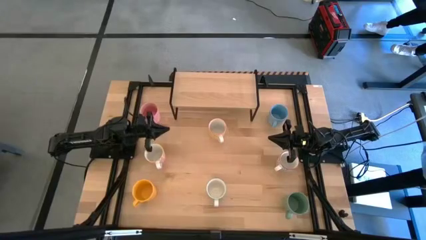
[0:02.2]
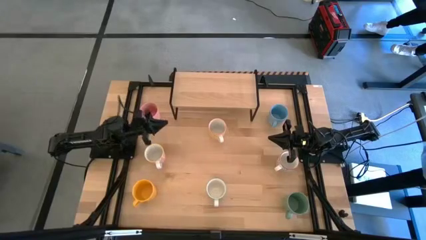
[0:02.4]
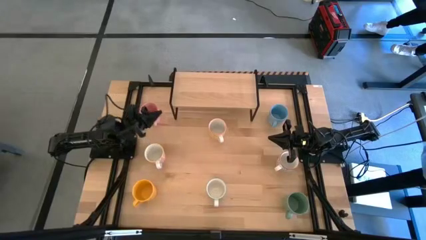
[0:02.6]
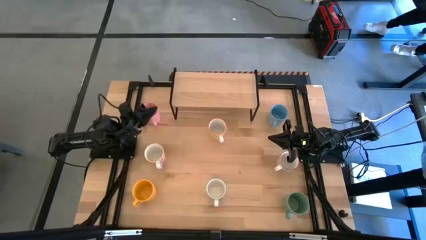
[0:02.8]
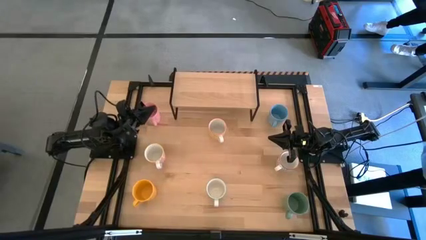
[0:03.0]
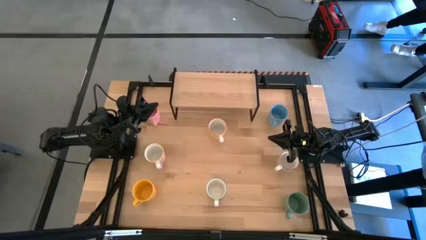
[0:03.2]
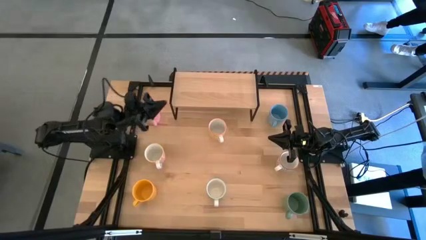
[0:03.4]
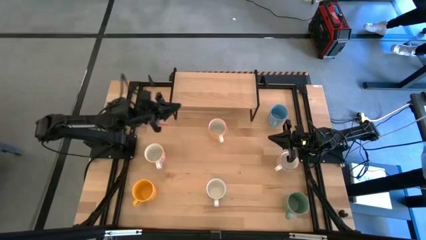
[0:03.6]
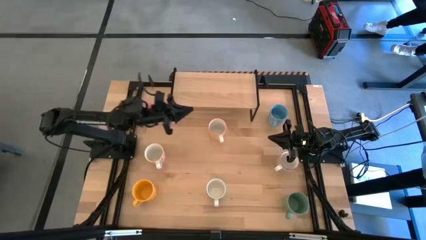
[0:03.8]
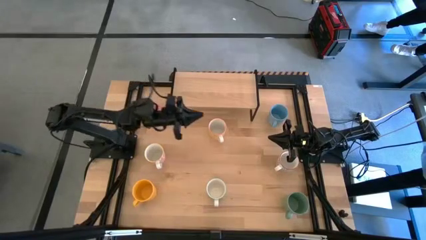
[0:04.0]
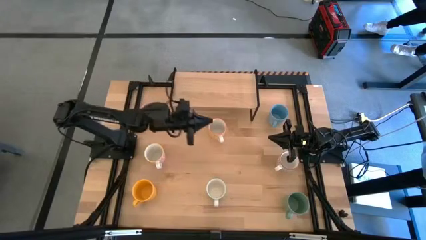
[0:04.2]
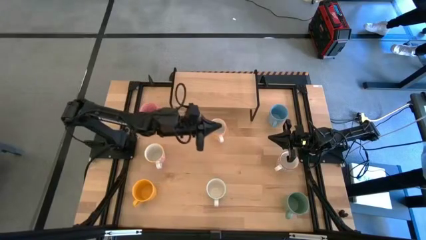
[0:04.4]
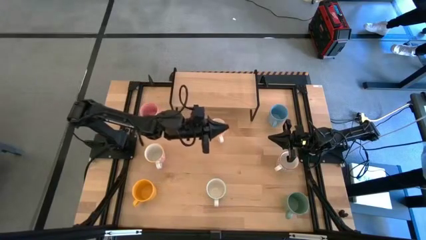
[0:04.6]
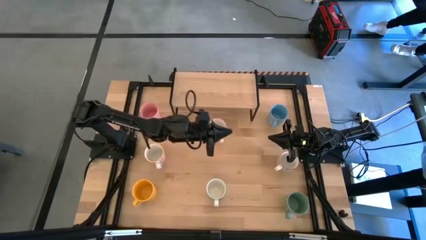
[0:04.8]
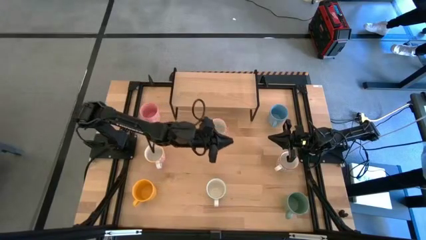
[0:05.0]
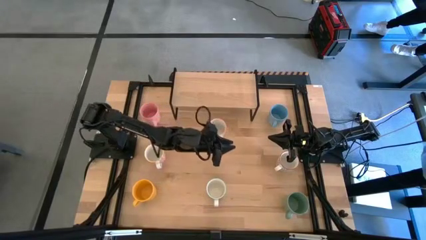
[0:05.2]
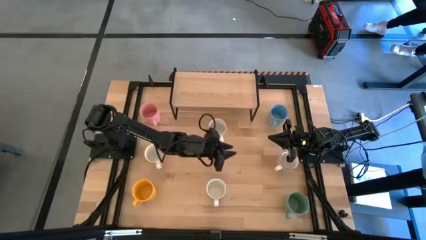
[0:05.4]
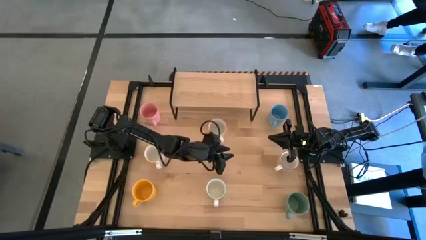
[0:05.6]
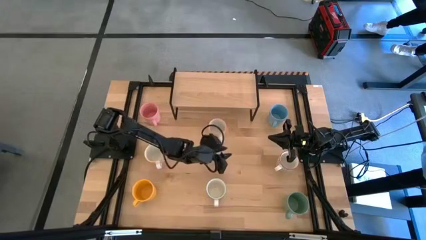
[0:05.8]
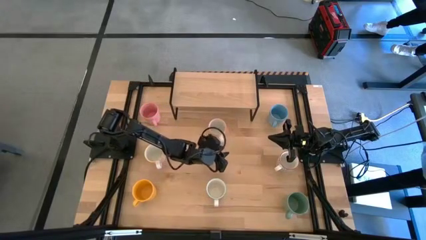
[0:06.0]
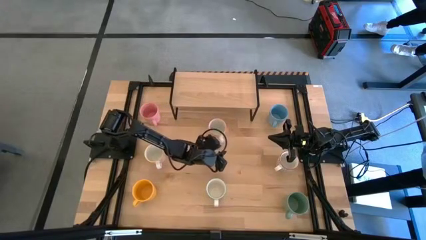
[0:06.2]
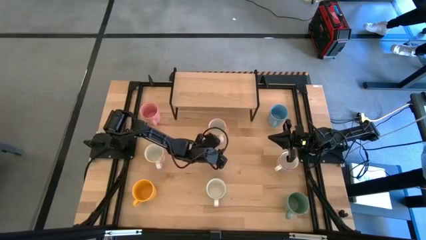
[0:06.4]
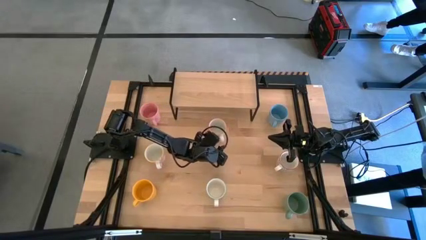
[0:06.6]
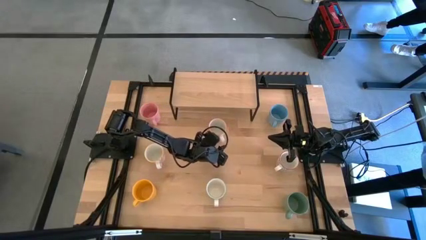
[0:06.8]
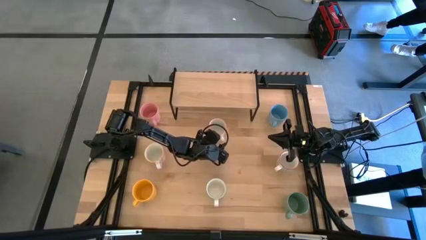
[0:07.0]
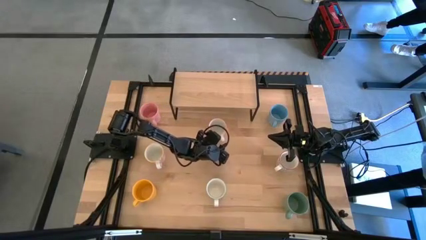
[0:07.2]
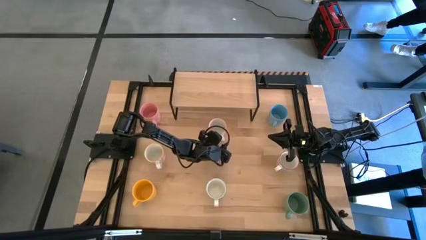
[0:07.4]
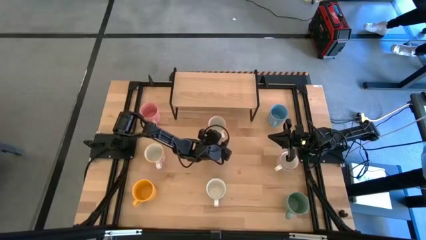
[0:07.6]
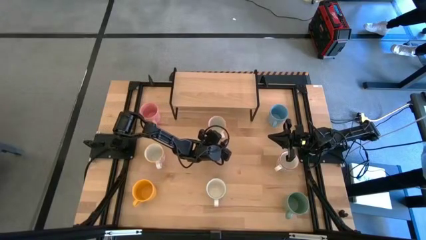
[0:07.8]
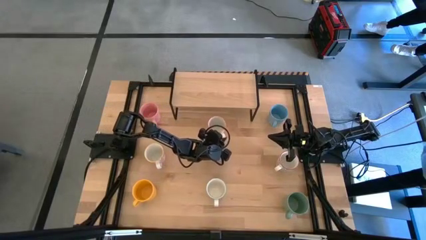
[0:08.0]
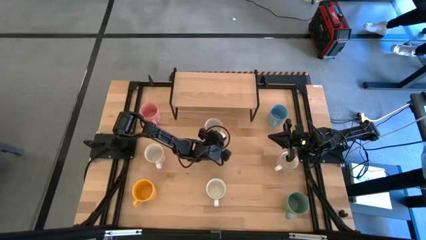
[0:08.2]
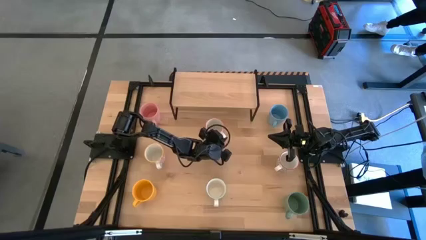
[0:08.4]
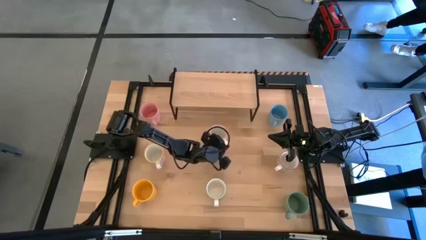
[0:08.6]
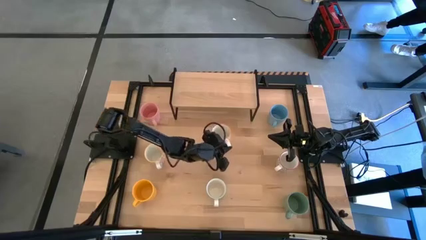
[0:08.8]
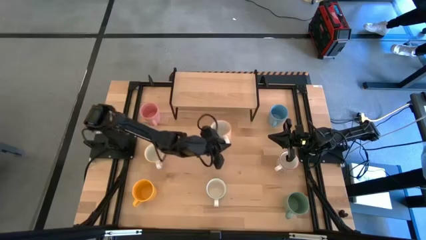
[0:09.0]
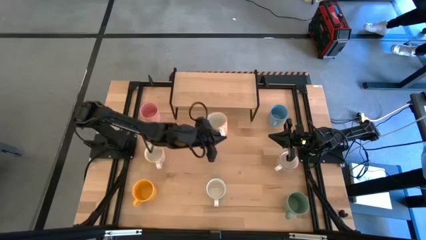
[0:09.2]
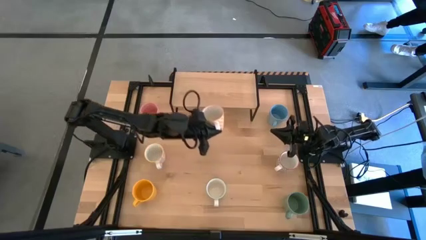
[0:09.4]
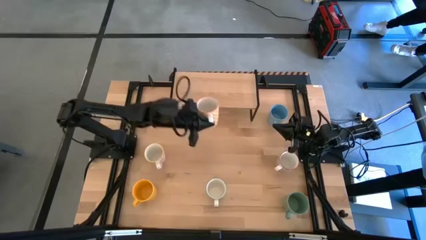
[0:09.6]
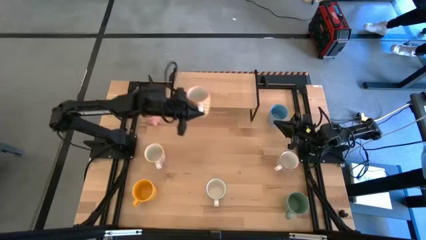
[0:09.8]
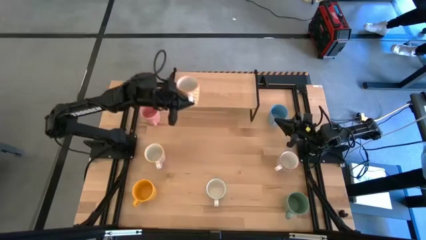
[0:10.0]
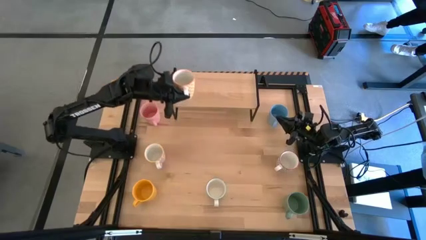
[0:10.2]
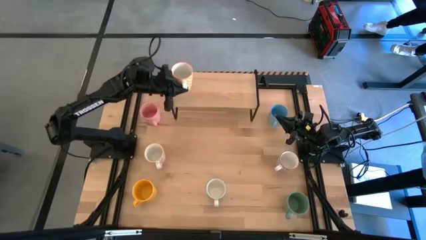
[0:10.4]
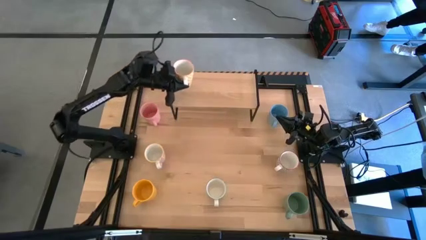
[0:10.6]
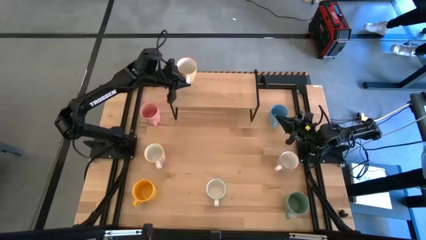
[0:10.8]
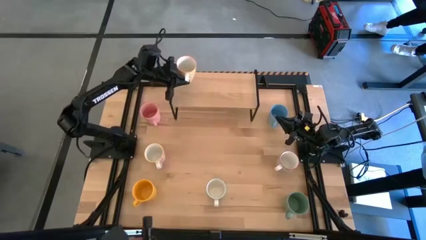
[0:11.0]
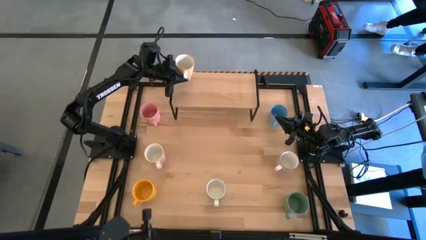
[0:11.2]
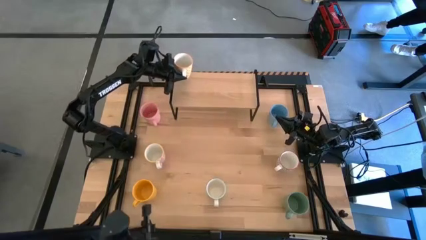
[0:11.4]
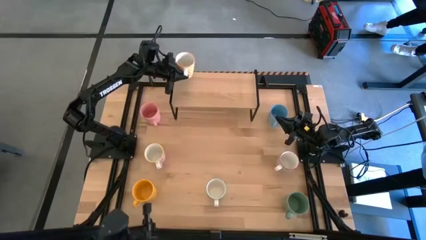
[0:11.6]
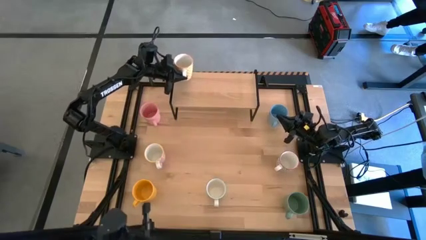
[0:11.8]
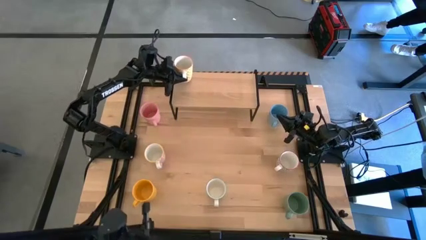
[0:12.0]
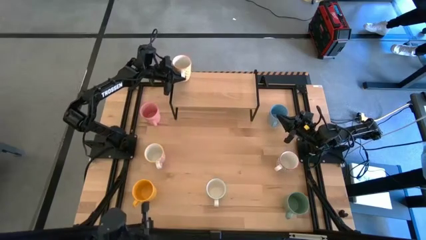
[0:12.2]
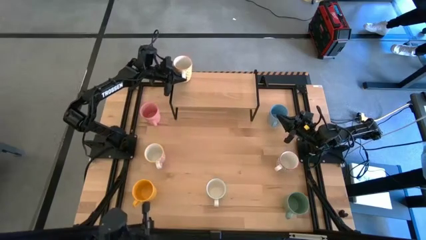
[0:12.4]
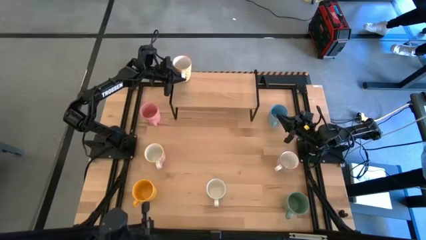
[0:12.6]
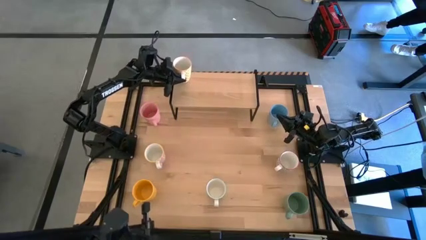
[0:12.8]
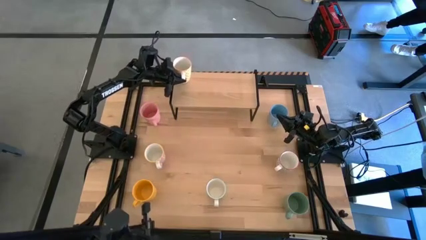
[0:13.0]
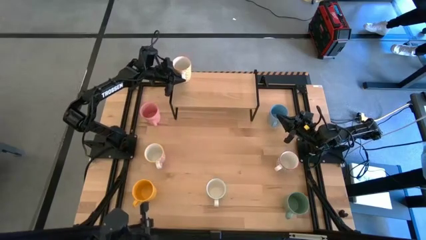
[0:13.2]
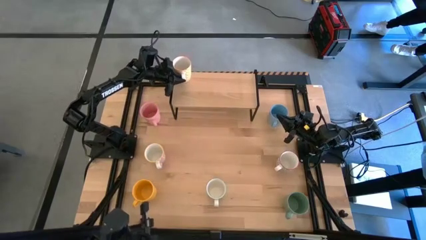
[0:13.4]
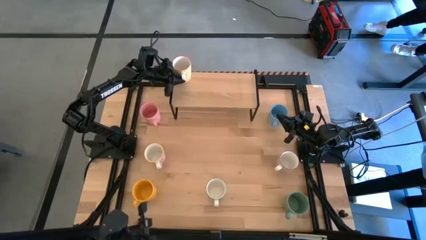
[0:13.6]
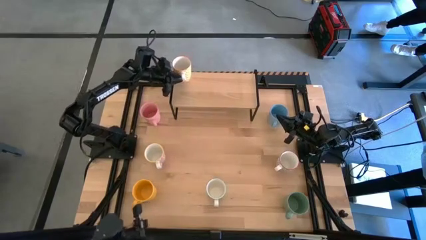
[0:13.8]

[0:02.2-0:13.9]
Task: Place coffee mugs
Put the yellow pattern mug on the shelf
